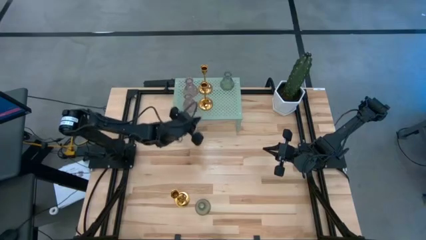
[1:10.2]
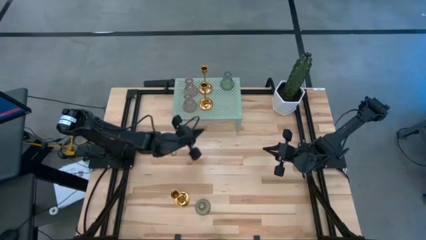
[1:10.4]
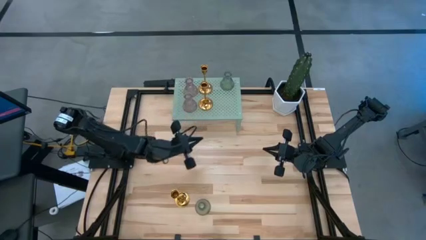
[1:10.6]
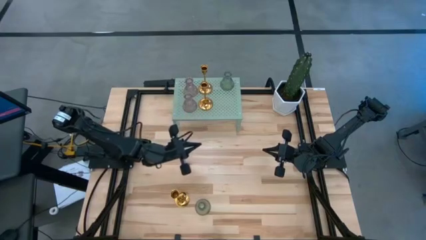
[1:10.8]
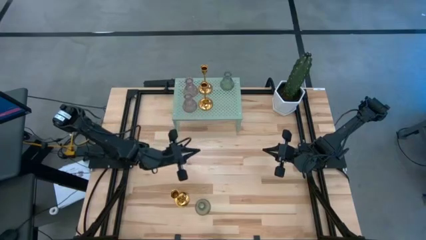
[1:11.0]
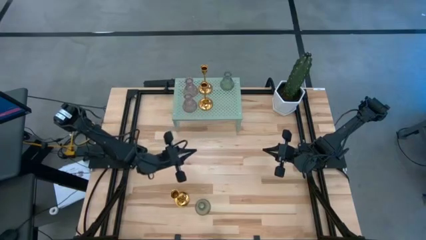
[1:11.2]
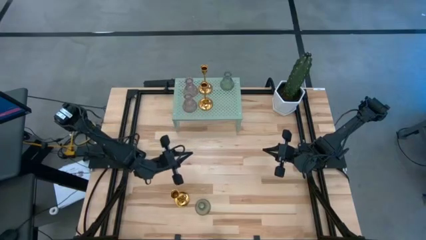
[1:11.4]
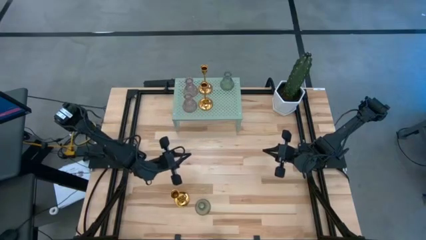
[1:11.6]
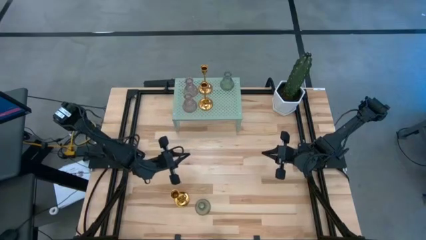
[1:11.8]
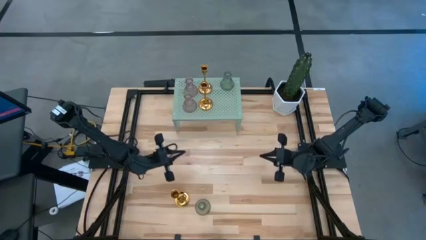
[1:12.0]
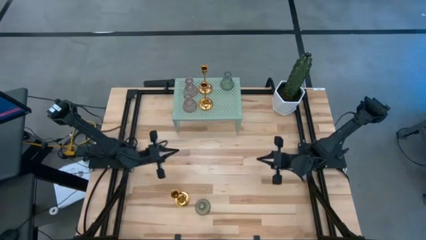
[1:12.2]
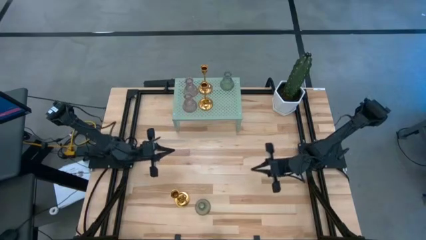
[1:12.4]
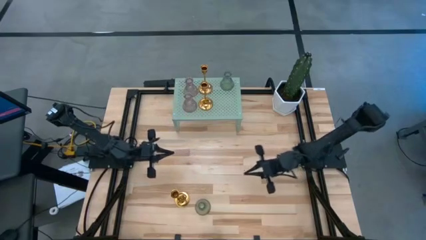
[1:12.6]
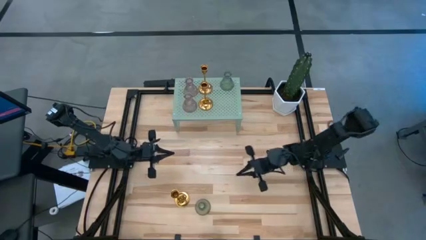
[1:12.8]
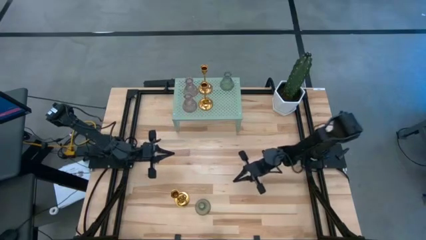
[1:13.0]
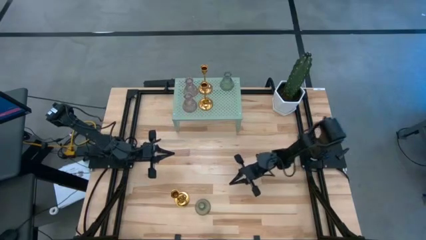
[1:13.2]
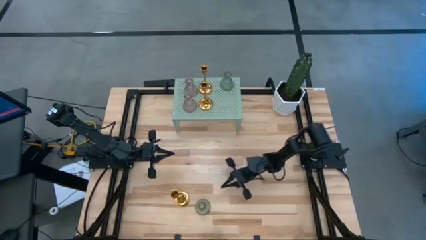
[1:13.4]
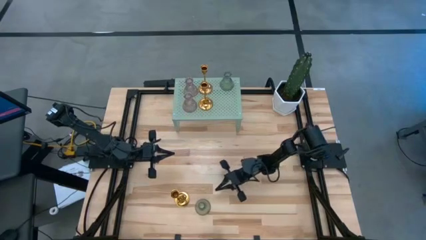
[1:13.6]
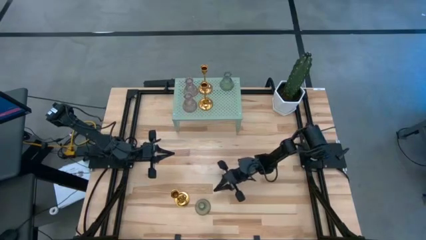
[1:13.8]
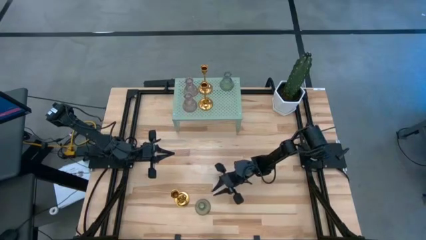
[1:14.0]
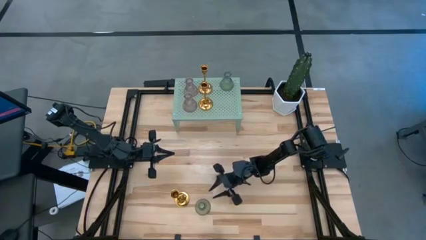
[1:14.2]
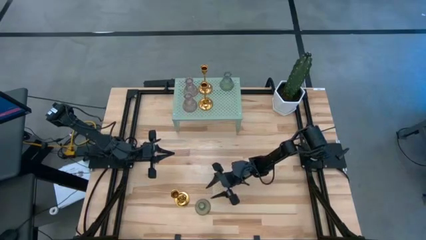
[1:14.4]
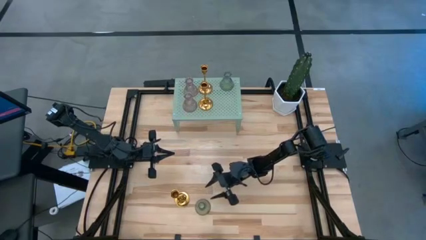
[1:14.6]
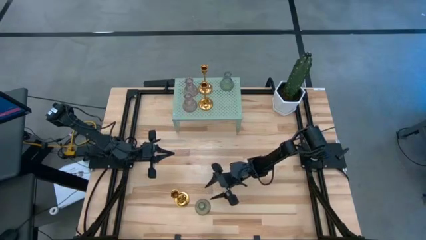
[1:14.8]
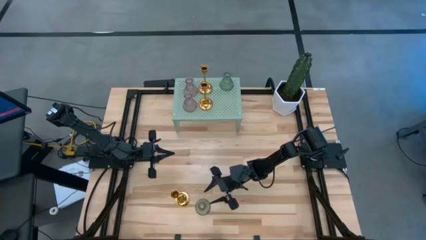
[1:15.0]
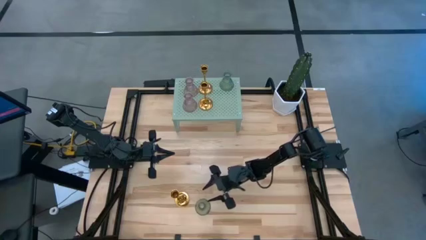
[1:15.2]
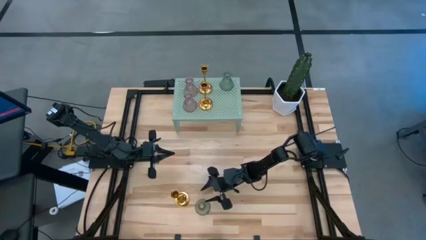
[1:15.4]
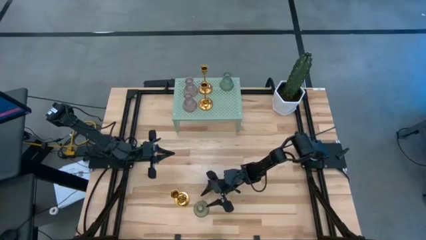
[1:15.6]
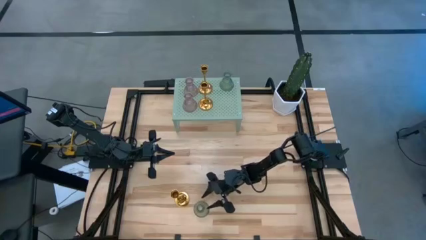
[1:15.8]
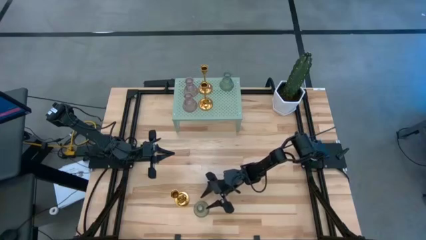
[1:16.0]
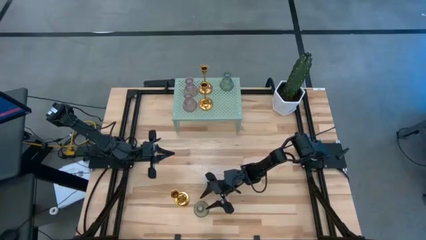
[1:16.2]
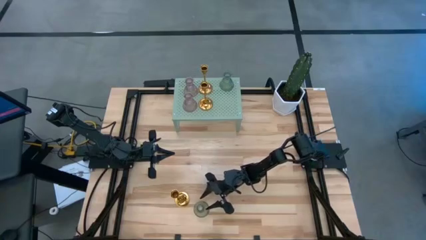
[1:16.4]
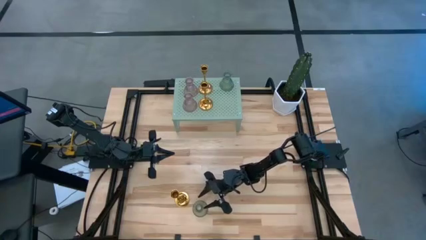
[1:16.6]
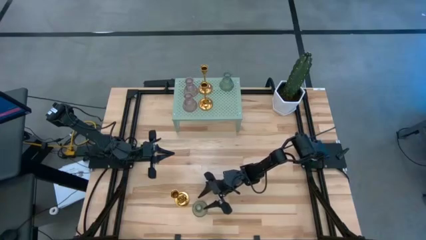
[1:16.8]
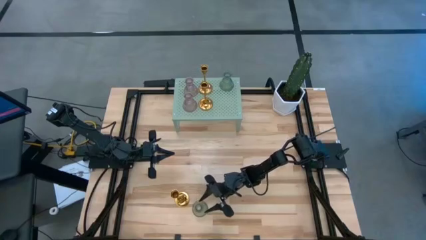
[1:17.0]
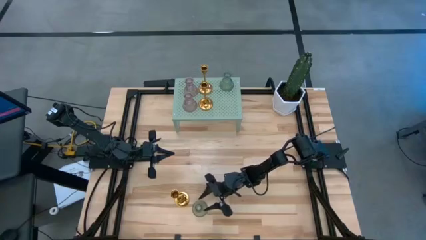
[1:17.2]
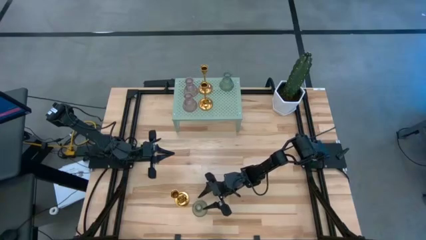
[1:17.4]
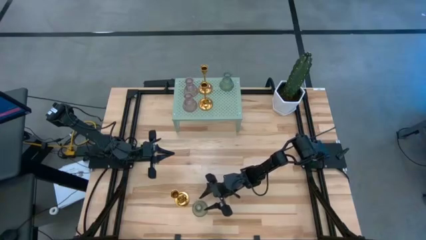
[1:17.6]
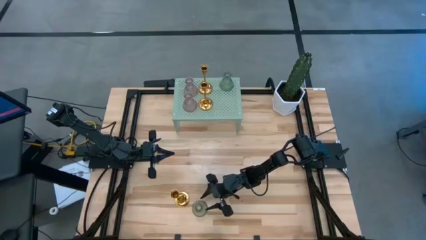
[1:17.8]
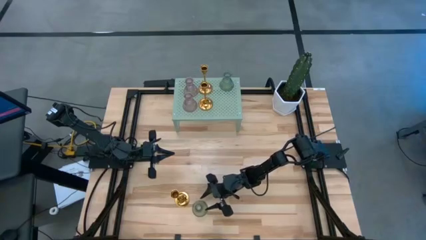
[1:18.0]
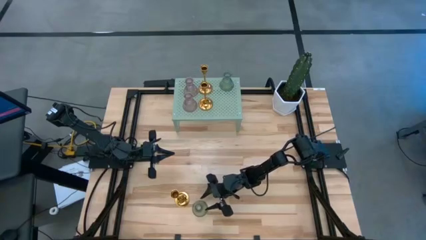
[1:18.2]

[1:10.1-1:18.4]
Task: Pick & Place candle stick holders
Put the green glass candle holder on the shelf
